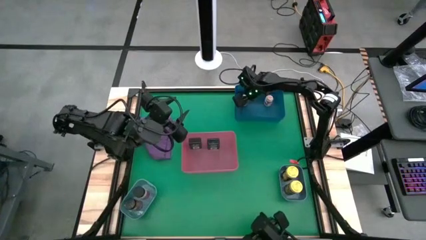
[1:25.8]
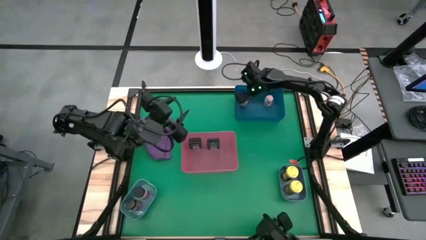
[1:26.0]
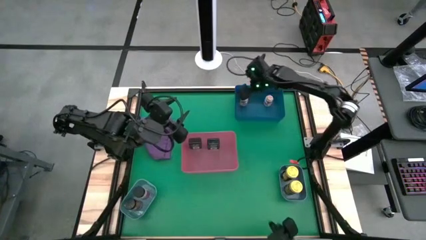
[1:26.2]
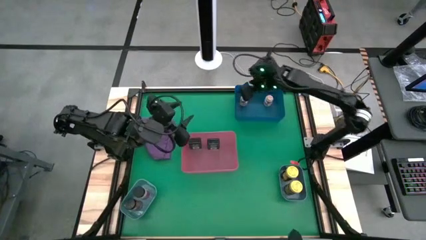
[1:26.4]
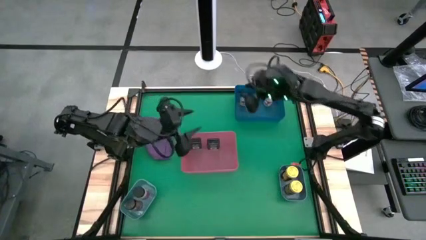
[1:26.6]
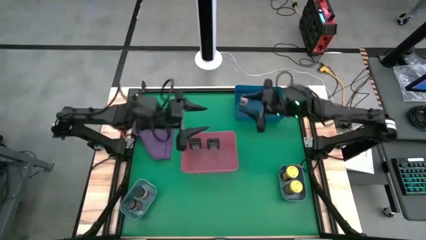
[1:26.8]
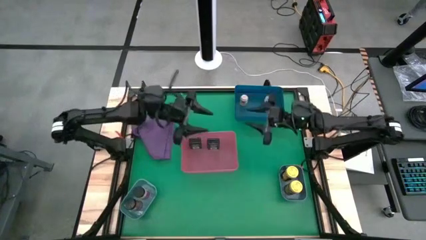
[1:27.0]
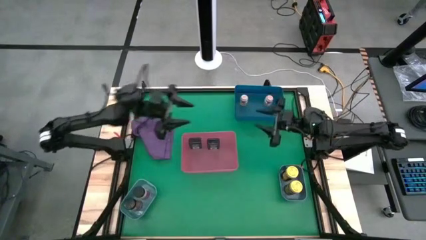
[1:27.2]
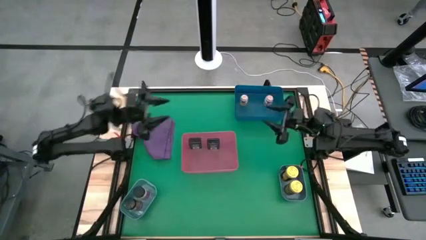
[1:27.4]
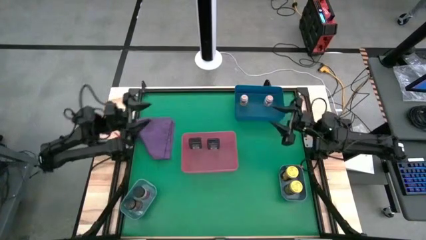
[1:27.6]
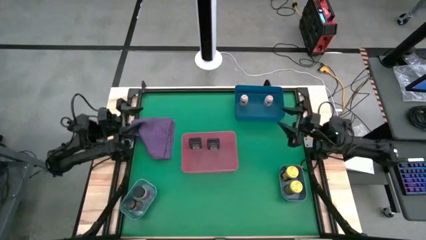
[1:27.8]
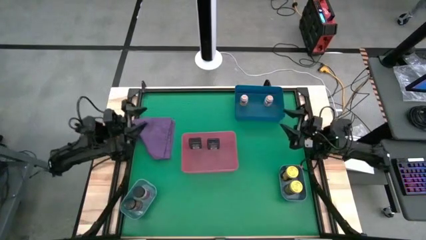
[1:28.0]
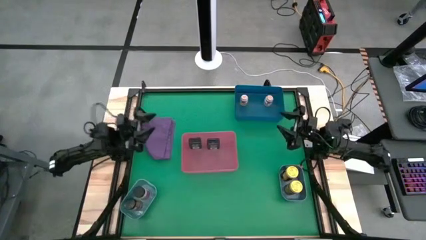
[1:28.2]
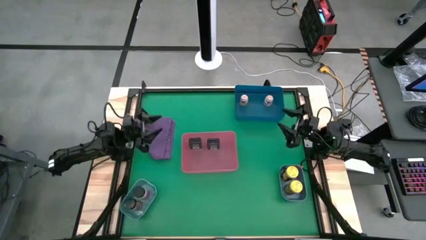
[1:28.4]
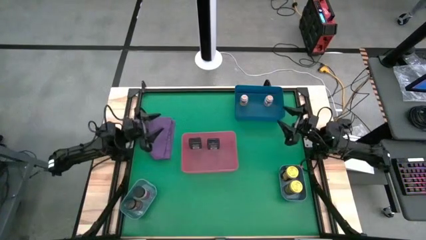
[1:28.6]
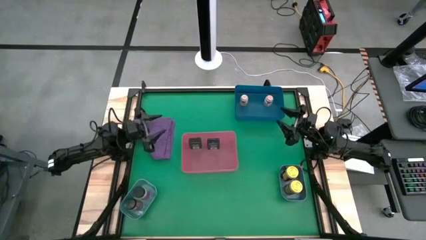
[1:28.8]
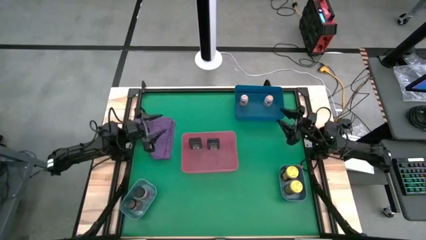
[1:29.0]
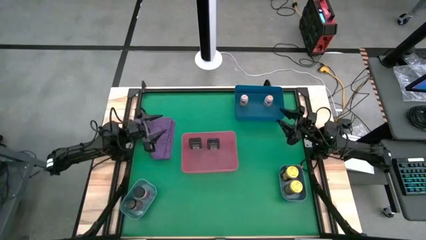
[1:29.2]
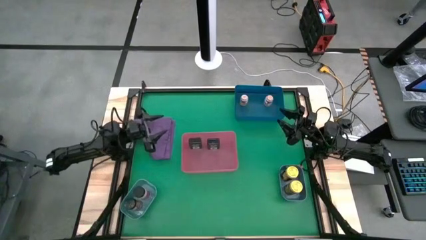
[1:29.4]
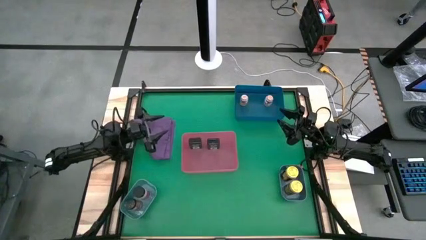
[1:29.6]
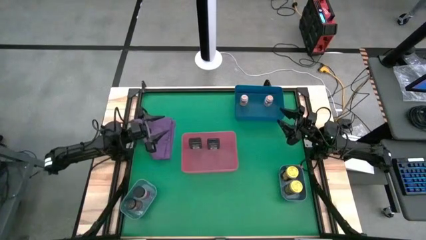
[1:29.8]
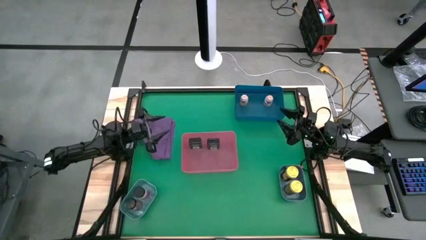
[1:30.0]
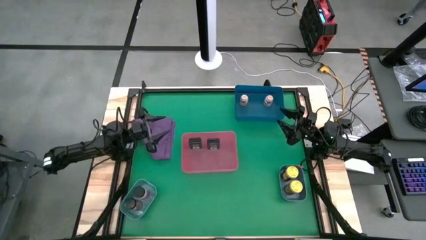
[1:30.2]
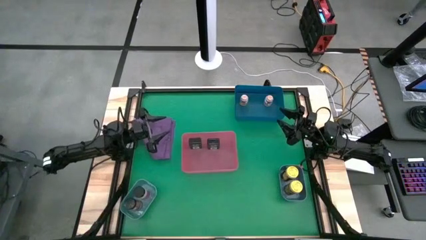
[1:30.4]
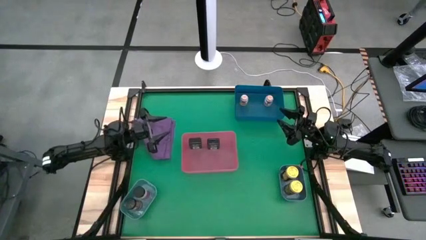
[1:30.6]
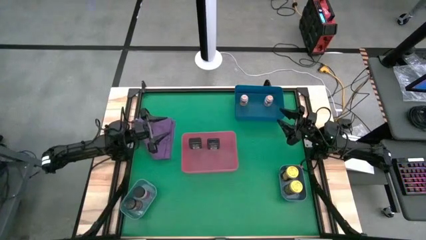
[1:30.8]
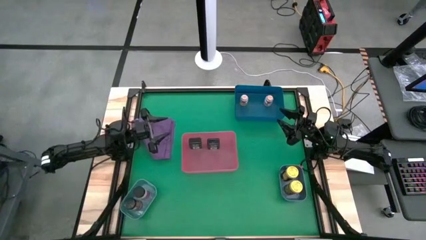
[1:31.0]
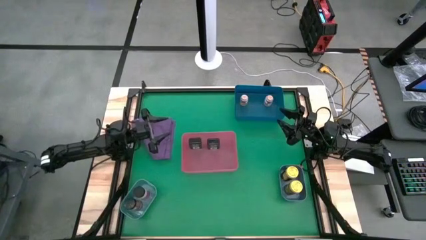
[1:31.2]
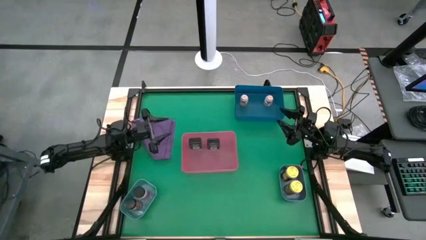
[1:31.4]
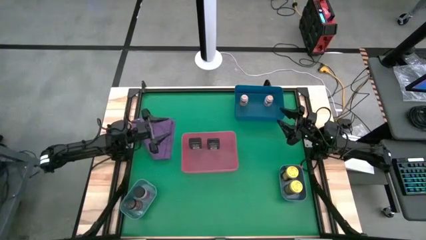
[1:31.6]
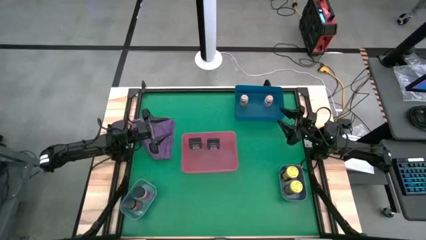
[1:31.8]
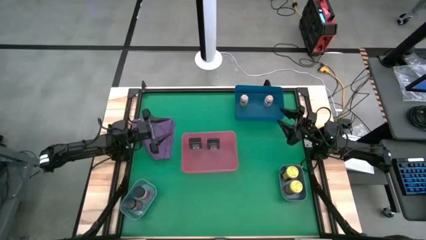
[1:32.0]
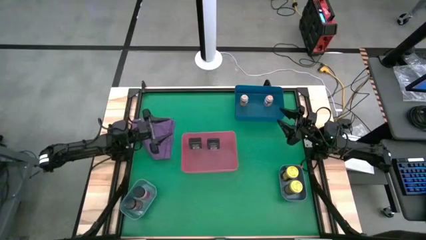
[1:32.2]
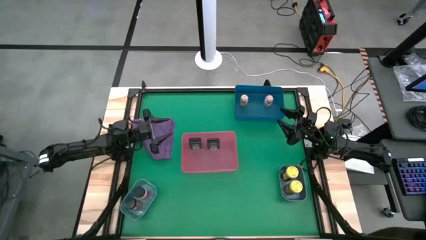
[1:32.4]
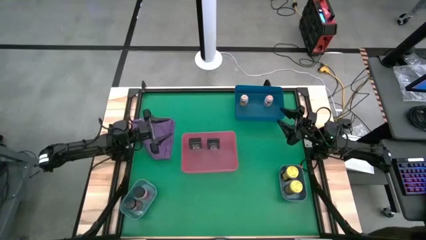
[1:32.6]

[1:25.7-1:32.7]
Task: Sort spices by type
Return to Home Position

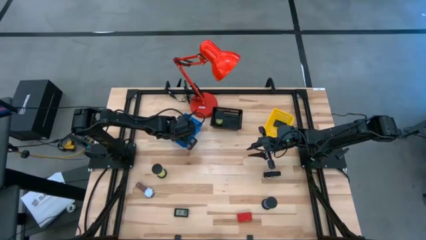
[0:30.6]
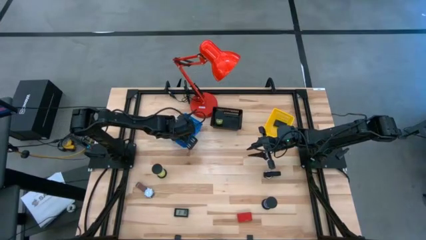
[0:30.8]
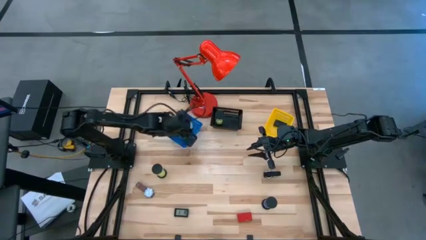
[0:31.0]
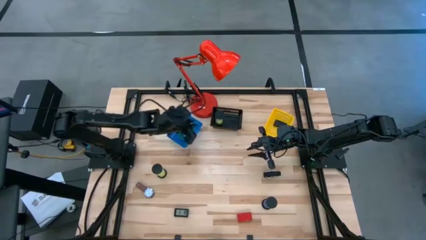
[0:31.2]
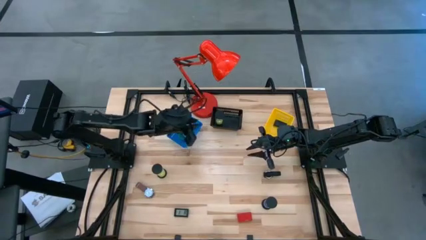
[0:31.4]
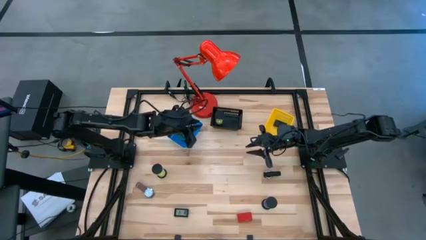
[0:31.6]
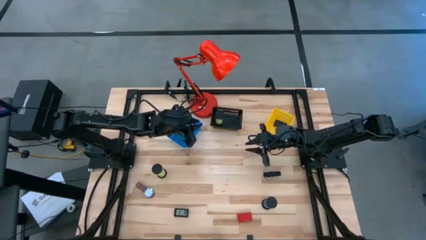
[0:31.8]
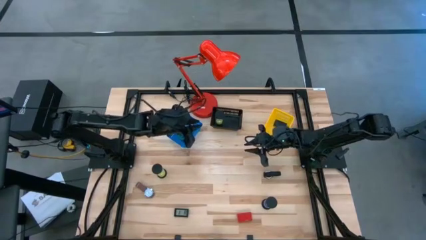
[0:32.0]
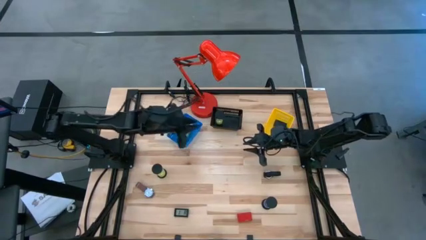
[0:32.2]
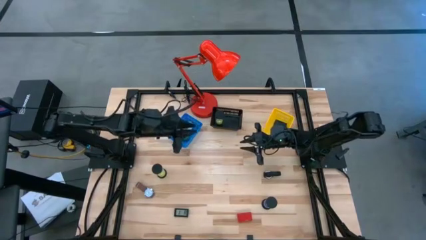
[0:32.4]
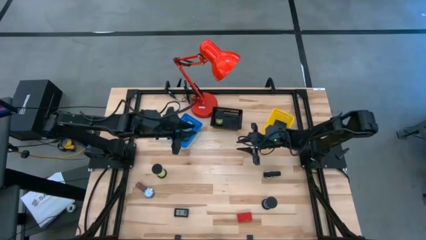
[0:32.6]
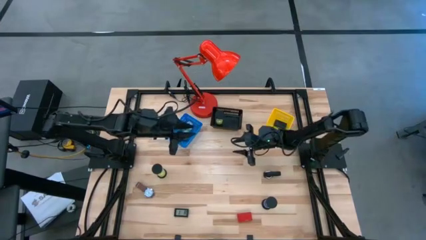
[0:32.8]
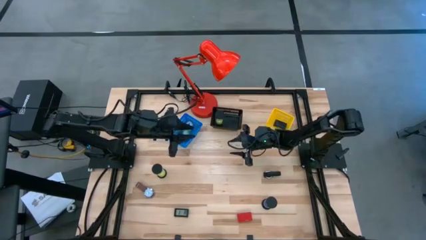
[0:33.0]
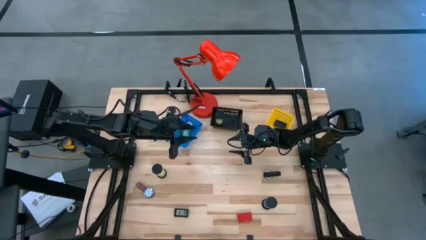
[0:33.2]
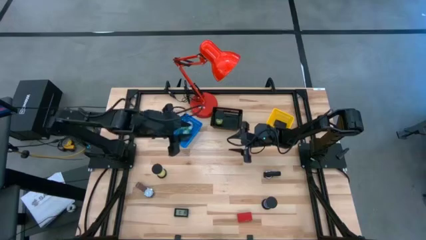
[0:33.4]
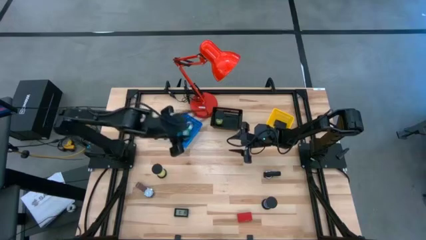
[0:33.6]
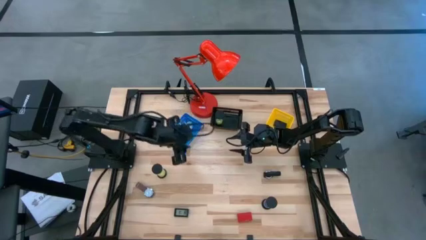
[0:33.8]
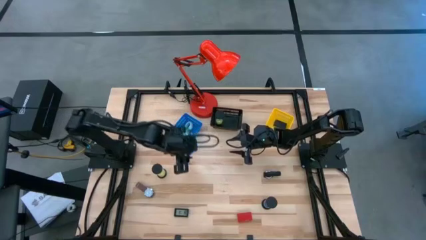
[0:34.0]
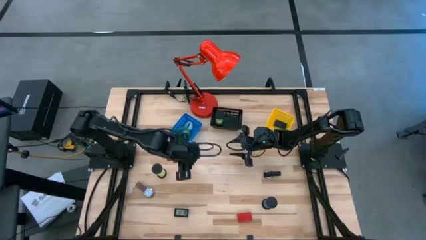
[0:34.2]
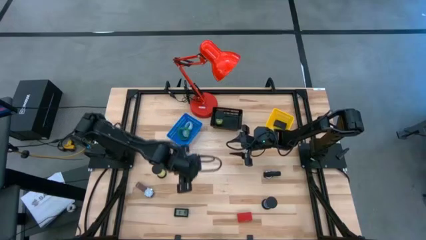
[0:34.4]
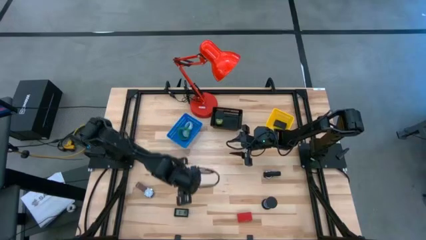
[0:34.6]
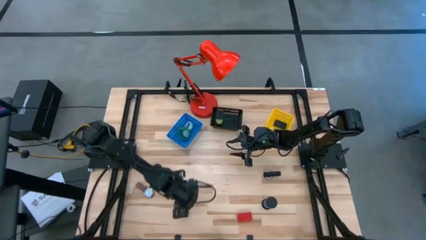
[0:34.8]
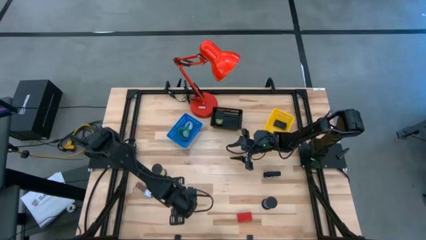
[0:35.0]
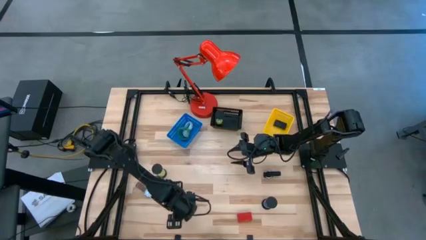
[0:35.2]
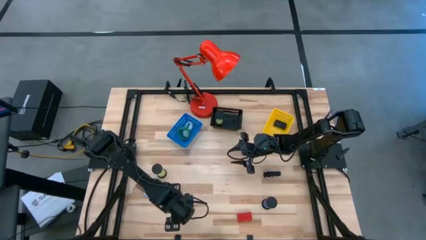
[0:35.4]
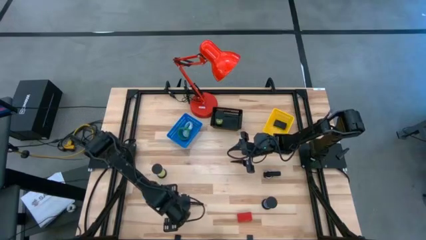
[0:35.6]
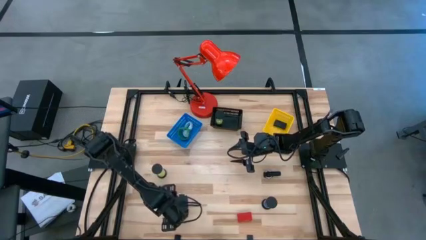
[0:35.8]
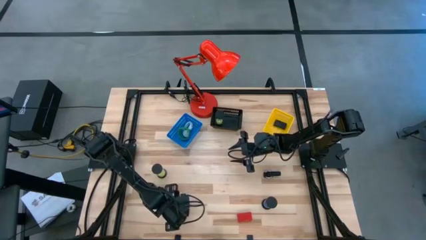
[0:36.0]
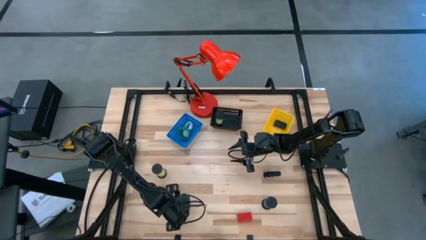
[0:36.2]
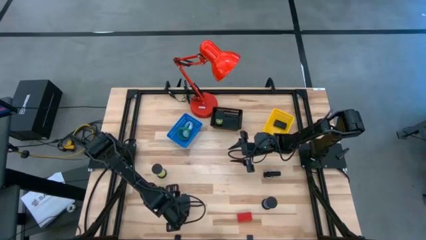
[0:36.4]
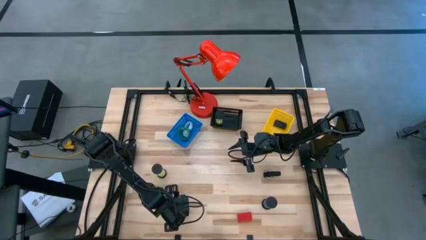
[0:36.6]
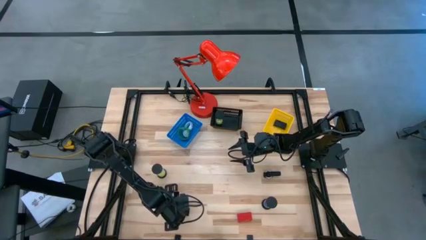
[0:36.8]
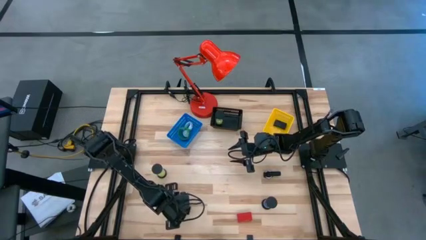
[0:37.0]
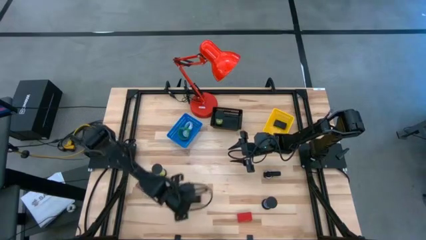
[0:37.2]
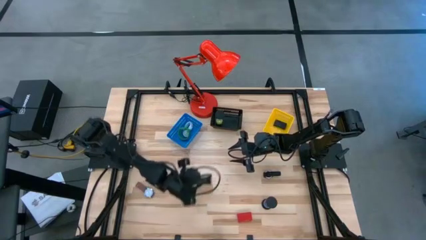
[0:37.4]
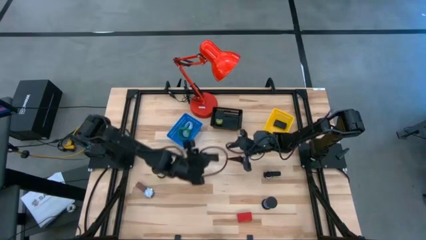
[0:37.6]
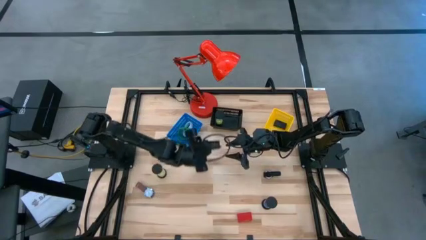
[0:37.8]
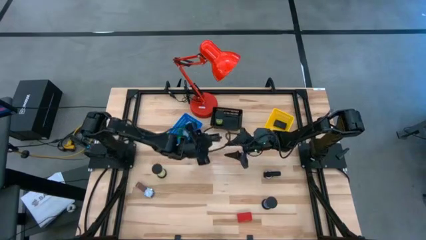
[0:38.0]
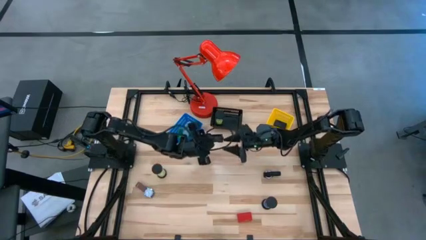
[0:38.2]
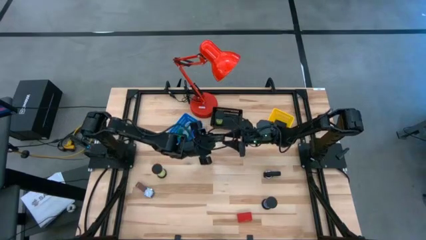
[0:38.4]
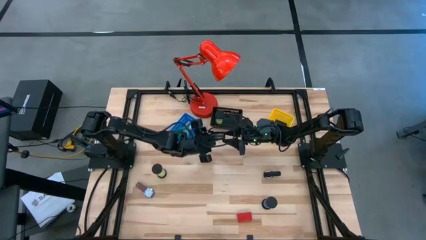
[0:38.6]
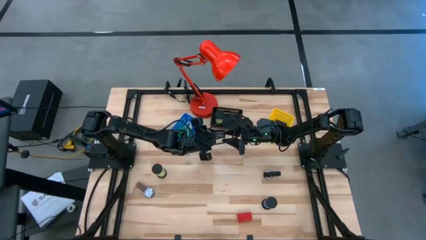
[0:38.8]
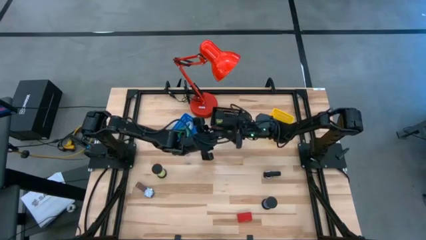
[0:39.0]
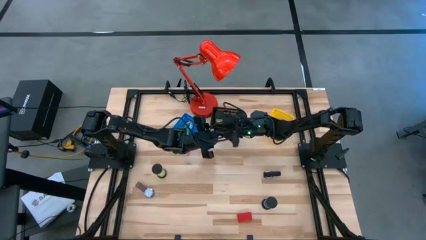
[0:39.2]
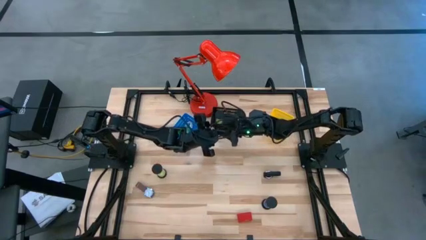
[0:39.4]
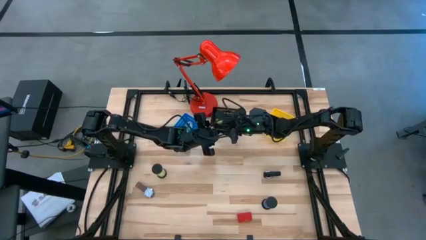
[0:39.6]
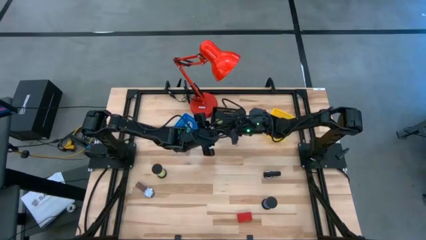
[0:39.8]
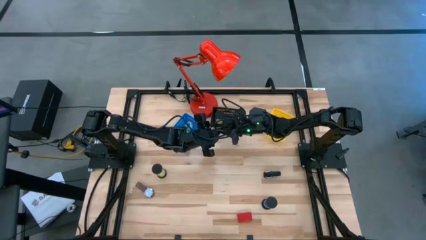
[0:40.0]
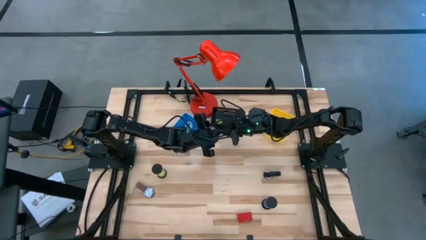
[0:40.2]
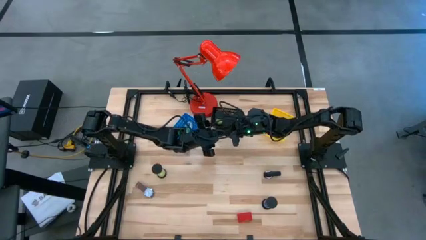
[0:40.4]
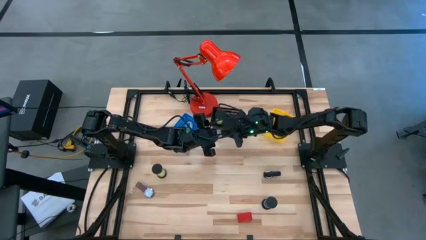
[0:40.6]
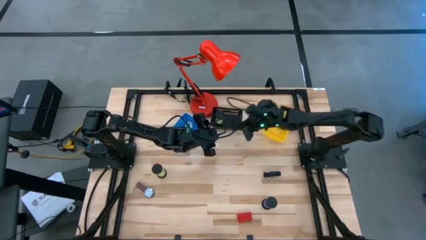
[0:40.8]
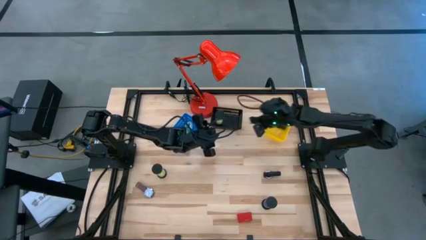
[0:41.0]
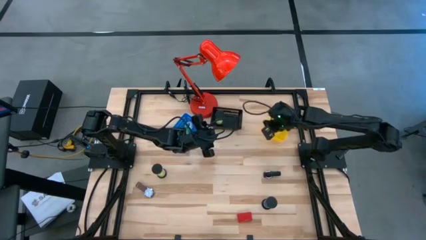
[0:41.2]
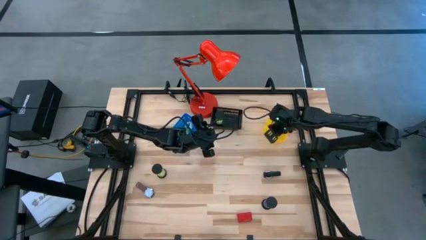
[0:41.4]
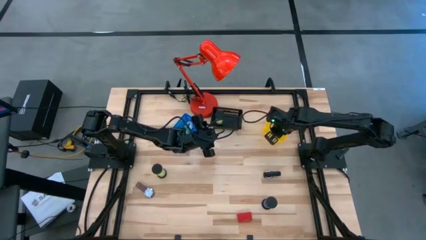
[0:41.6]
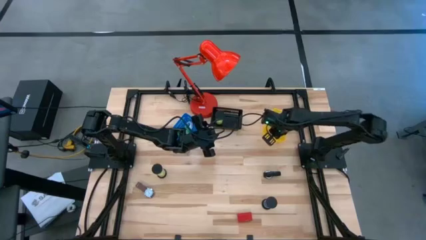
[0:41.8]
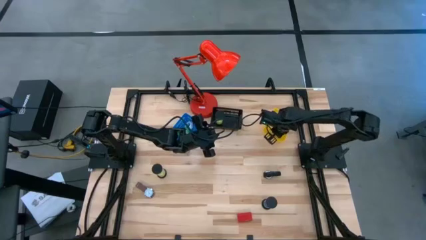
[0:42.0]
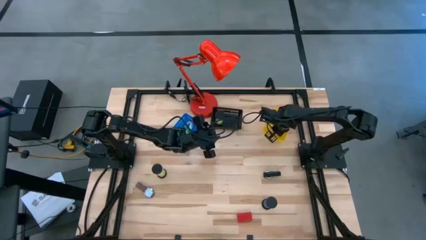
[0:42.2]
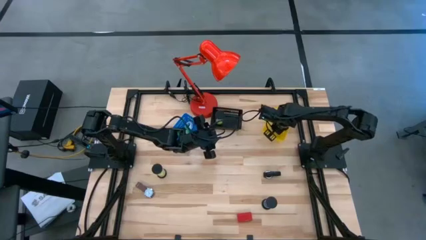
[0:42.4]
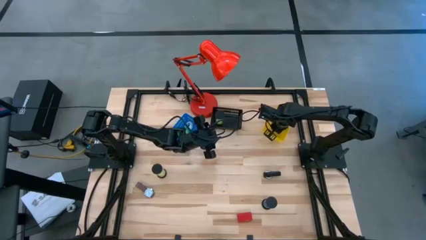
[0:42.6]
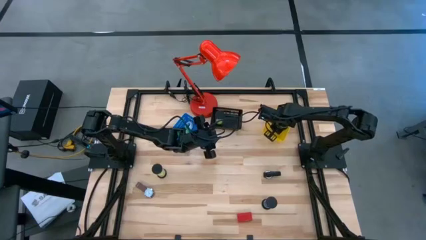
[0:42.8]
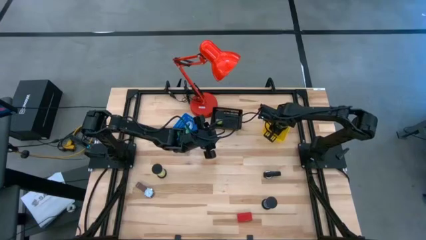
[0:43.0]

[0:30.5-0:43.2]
Task: Pick & Place Office items
Put the black digital timer into the yellow bin
